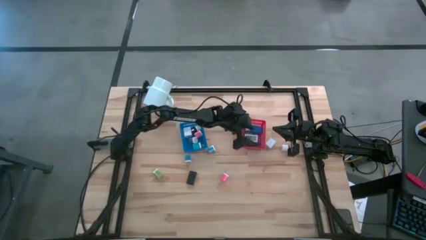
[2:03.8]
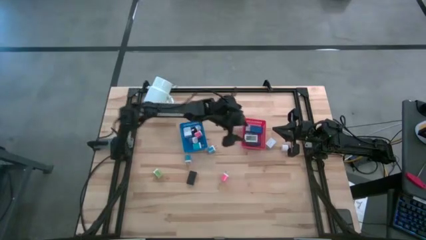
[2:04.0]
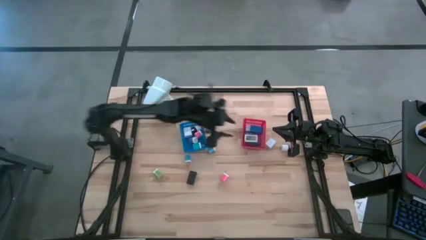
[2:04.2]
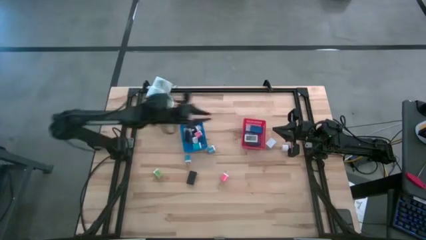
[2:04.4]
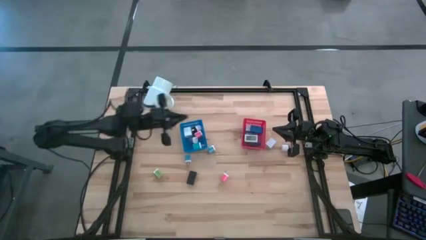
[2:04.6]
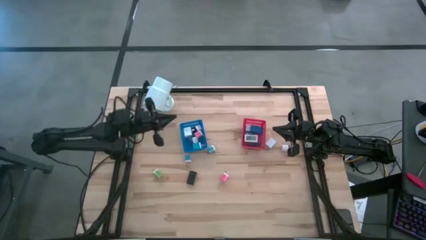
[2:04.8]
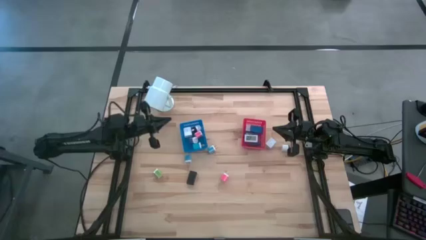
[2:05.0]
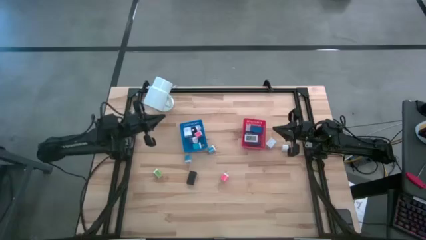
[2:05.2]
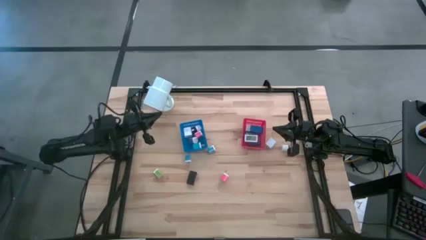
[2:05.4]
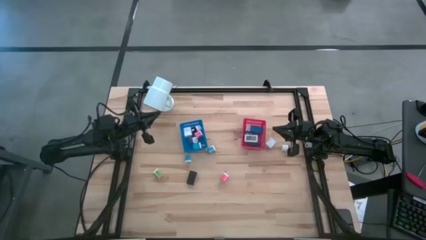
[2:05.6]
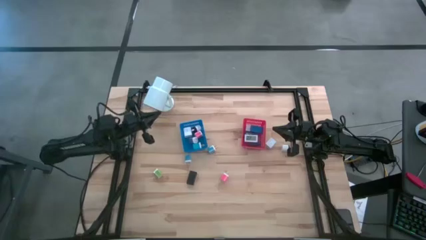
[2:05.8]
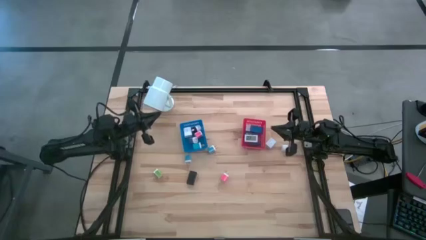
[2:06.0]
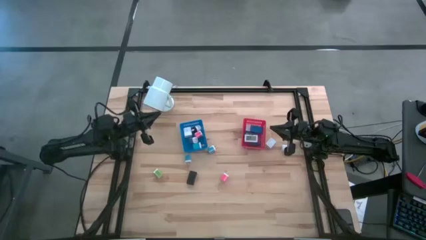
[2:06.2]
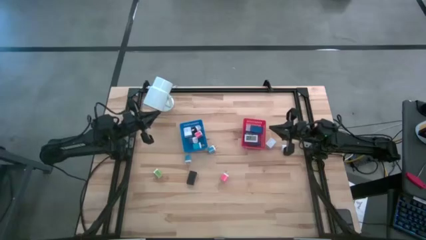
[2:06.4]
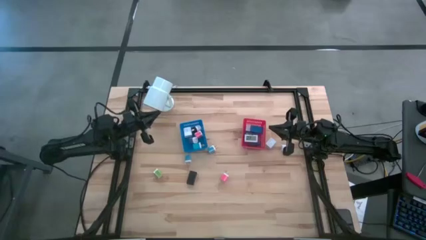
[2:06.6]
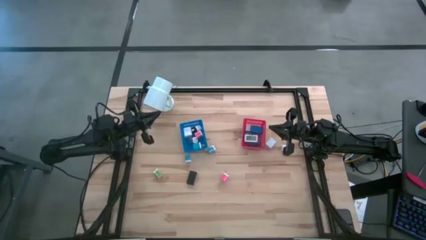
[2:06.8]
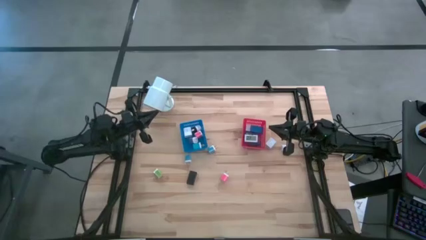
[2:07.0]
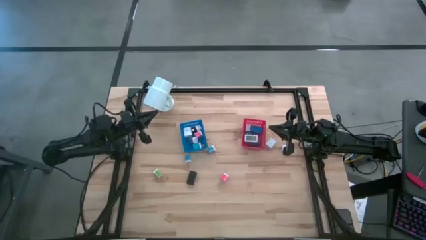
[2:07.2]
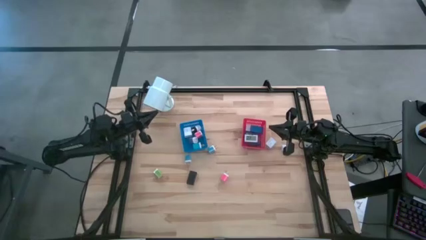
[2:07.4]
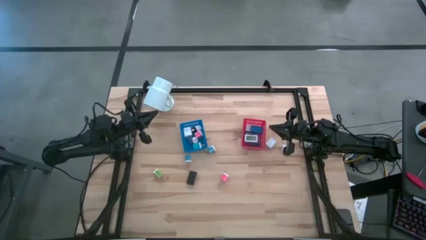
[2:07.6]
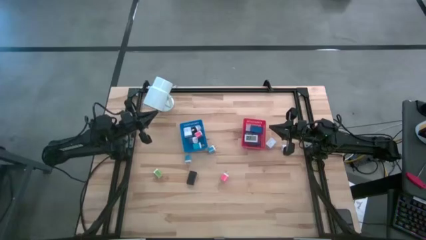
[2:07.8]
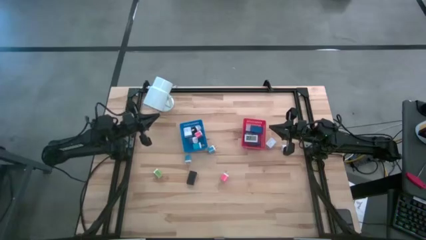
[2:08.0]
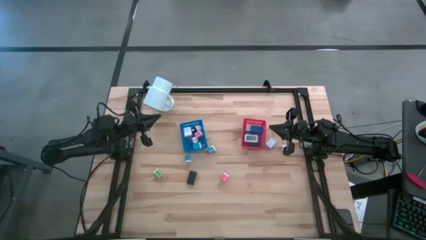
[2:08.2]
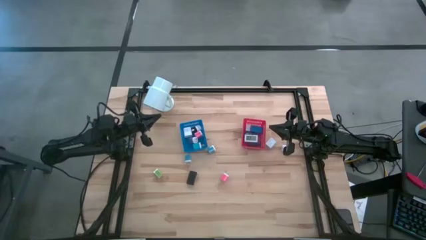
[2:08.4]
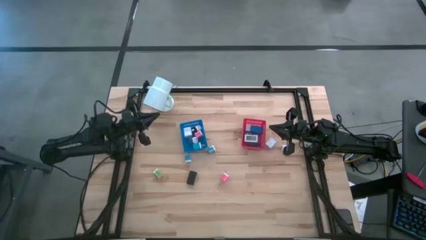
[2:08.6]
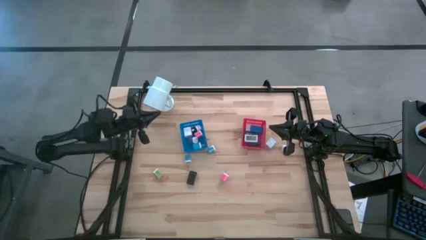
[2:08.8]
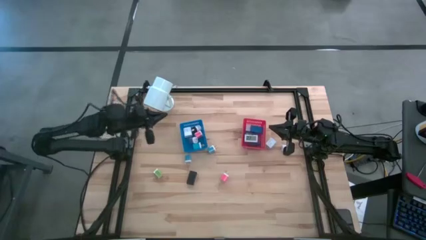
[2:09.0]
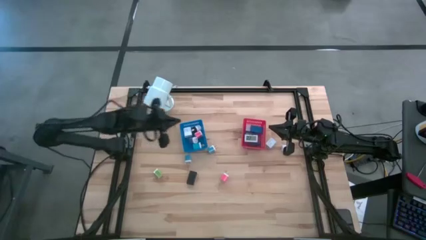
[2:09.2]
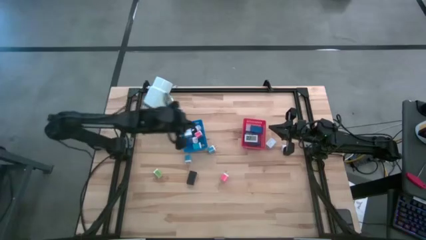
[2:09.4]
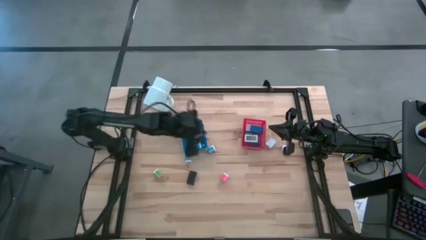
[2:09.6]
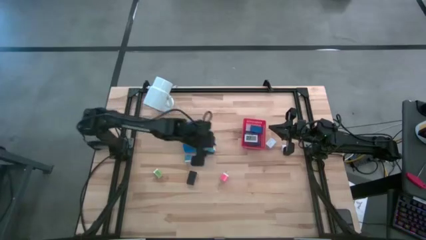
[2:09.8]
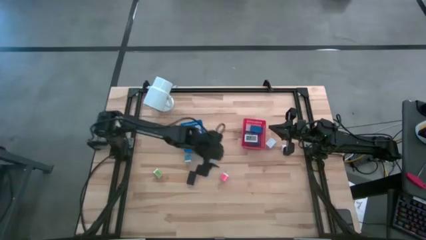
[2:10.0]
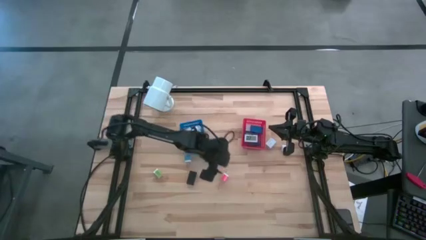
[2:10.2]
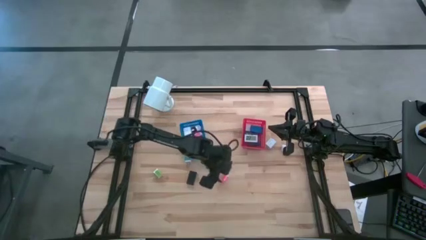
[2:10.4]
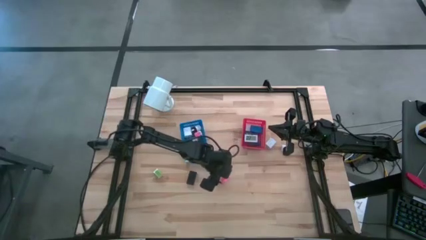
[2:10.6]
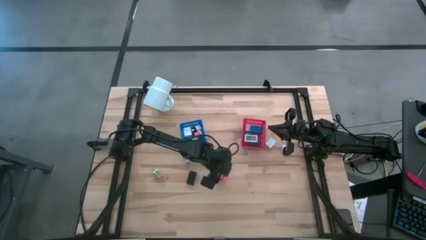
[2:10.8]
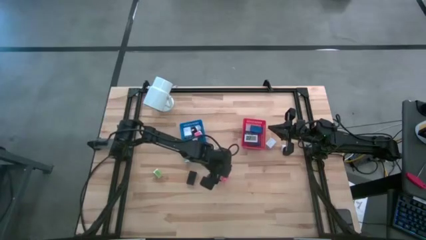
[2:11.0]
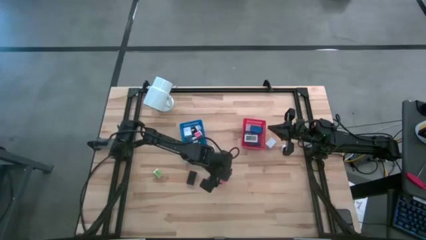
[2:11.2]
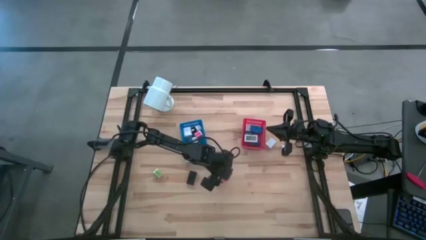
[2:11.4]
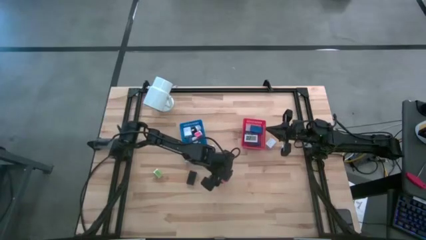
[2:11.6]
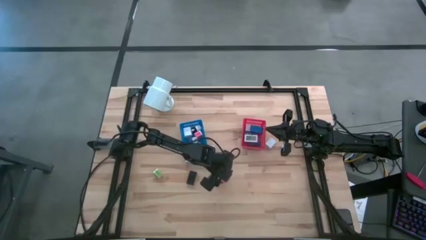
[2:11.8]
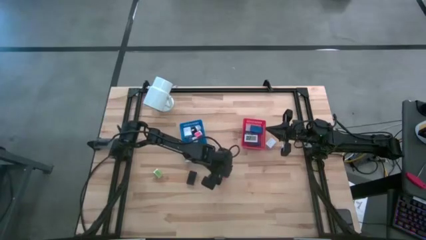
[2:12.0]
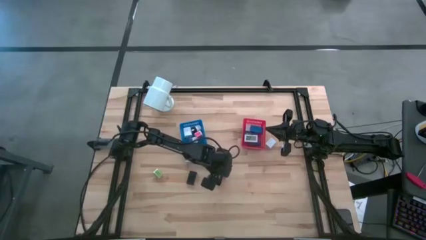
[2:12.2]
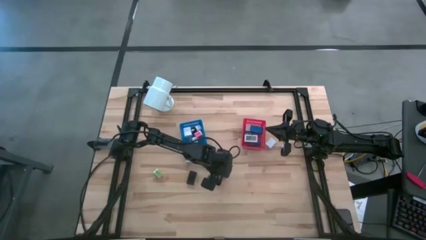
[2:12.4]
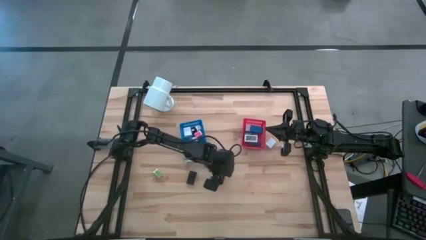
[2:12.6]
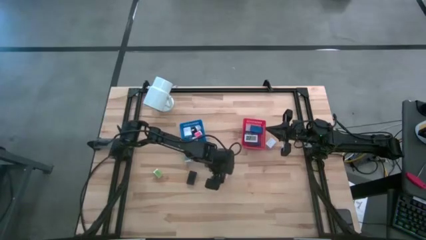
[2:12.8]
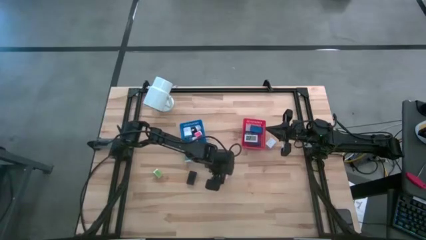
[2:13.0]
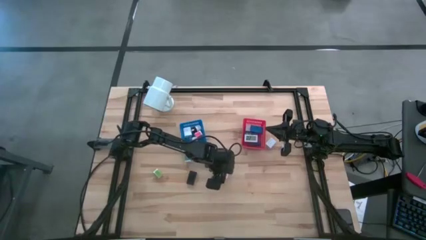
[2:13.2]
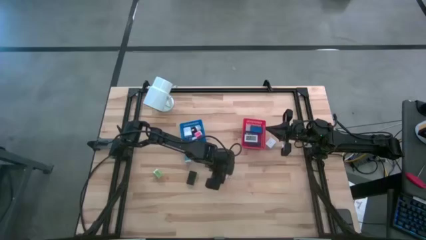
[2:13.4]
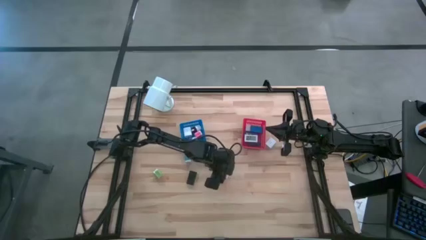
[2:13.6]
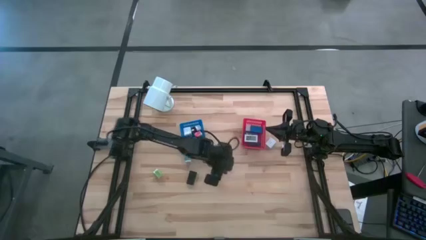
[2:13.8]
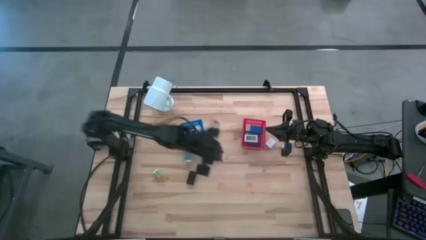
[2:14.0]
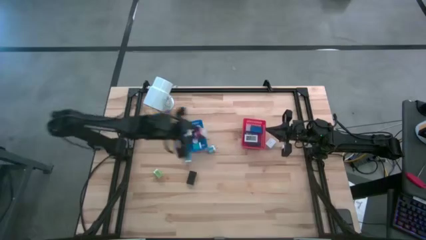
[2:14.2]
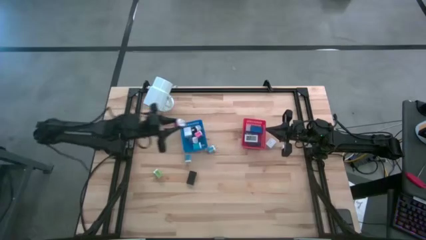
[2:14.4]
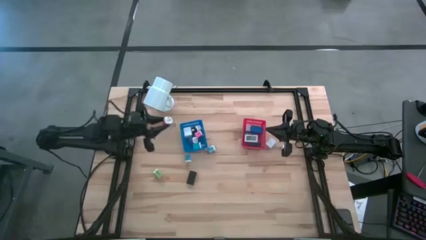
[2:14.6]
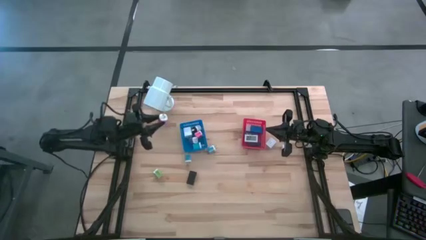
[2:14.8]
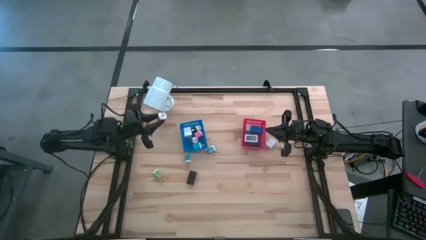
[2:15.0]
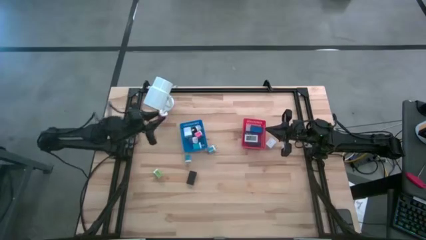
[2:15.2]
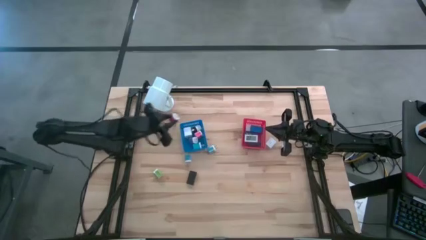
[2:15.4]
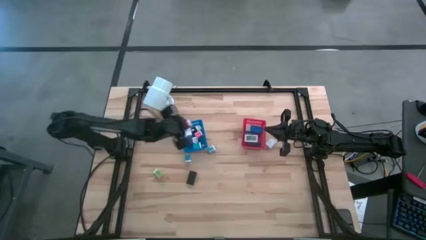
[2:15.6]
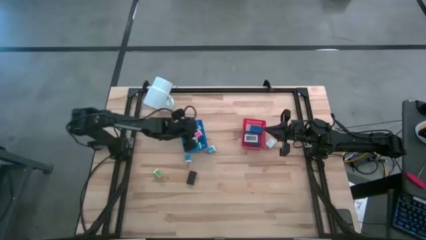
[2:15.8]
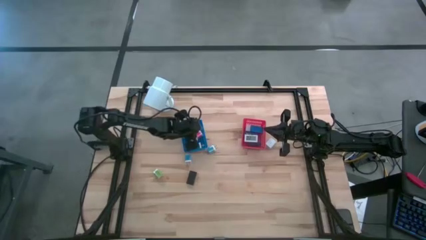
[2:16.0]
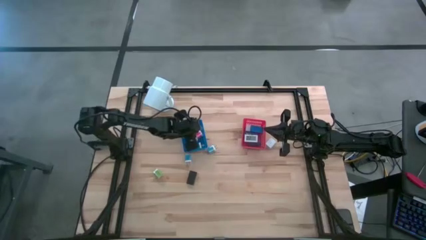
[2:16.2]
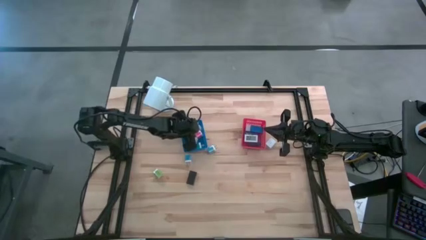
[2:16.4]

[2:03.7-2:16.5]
Task: Pick & Place Office items
Put the pink charger adapter into the blue bin
